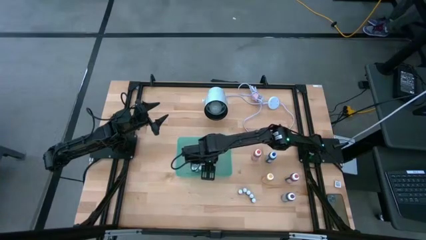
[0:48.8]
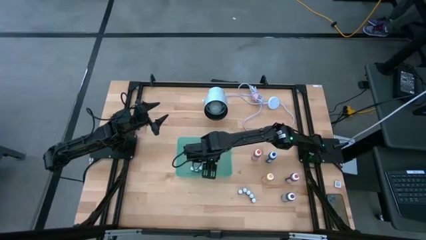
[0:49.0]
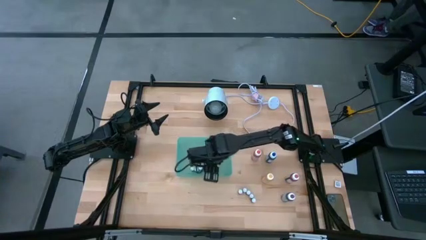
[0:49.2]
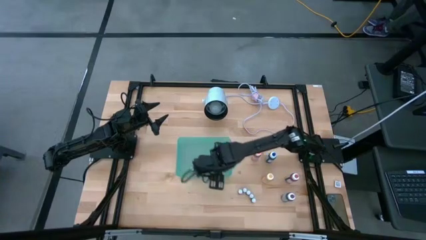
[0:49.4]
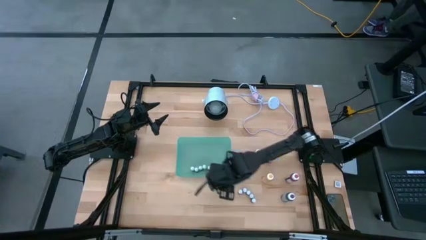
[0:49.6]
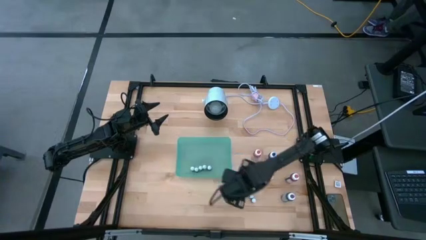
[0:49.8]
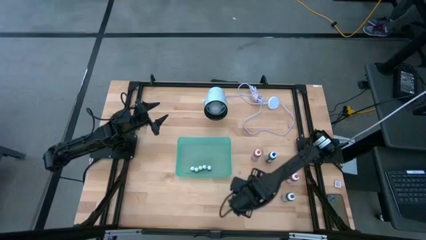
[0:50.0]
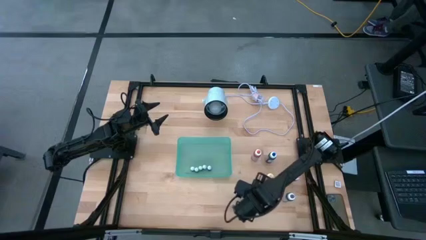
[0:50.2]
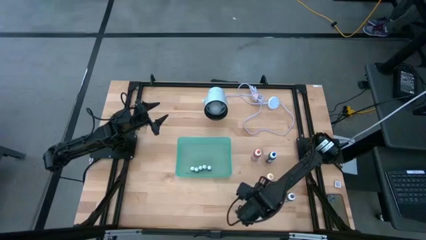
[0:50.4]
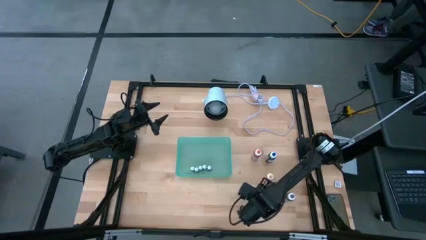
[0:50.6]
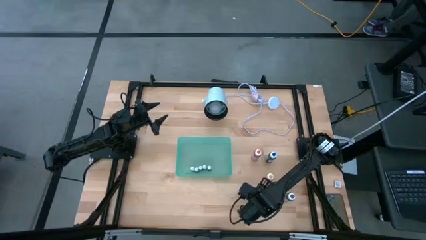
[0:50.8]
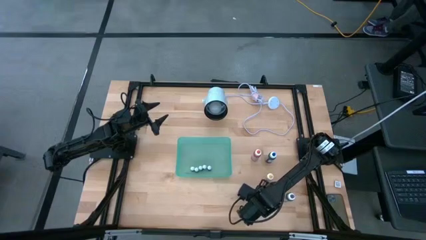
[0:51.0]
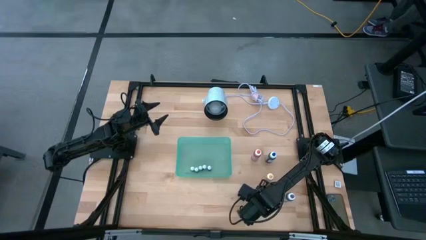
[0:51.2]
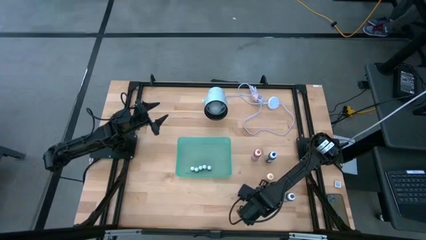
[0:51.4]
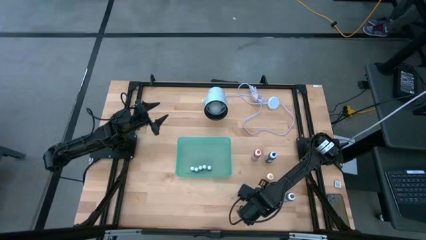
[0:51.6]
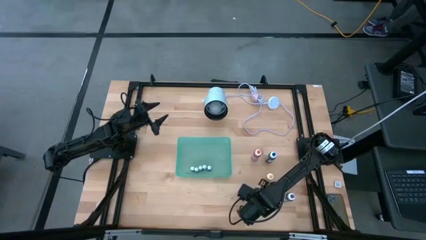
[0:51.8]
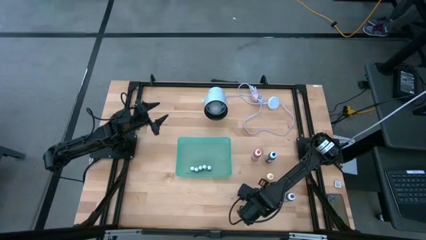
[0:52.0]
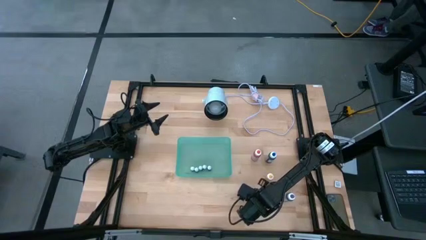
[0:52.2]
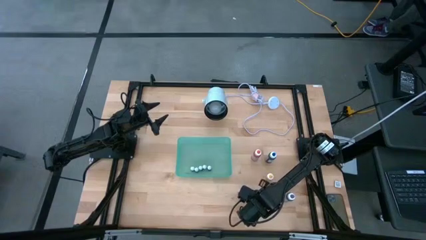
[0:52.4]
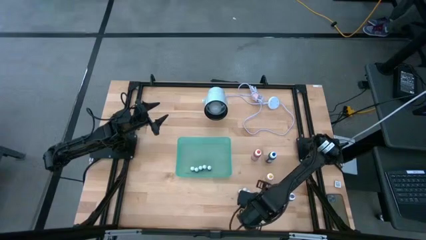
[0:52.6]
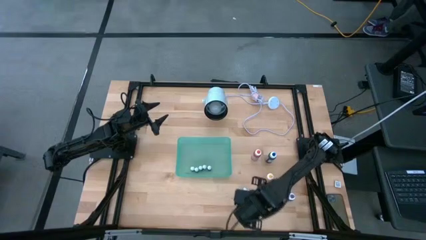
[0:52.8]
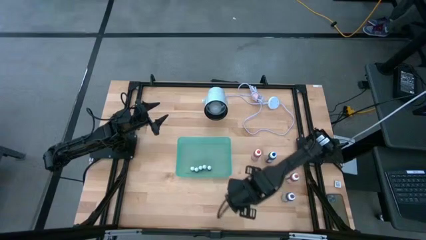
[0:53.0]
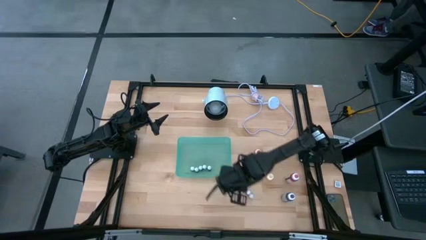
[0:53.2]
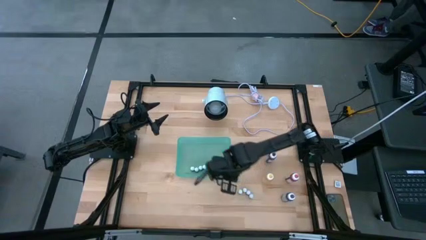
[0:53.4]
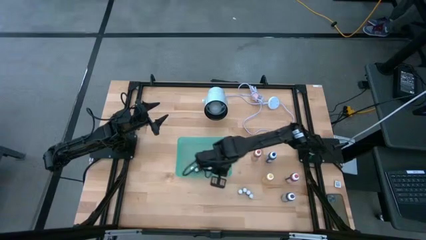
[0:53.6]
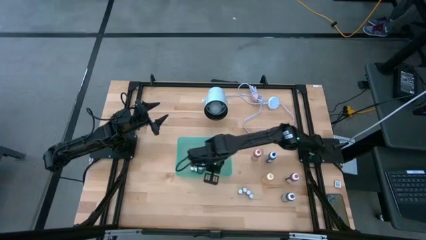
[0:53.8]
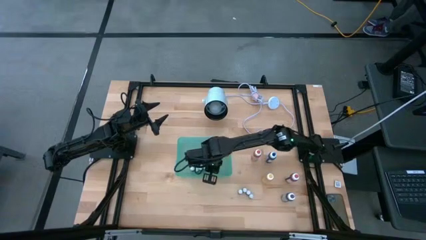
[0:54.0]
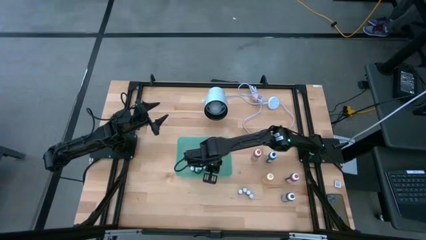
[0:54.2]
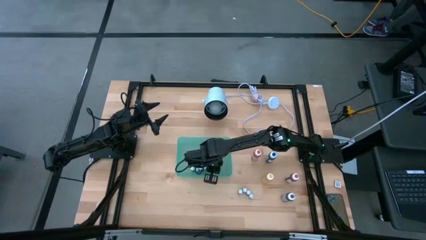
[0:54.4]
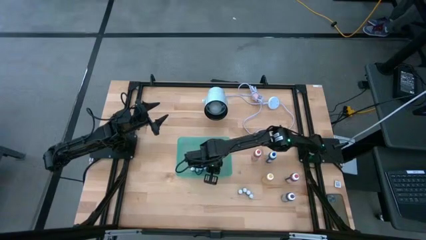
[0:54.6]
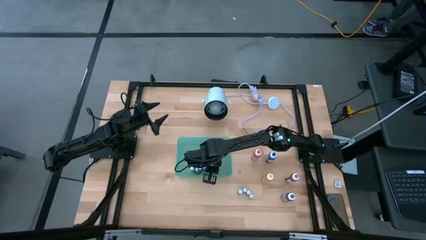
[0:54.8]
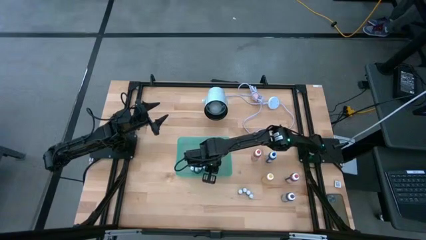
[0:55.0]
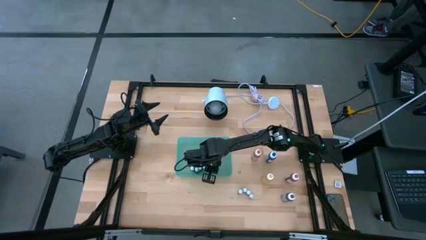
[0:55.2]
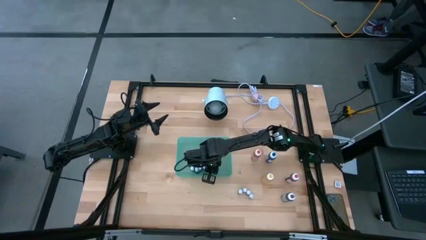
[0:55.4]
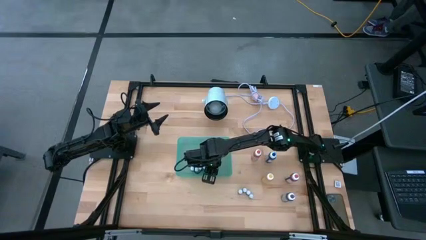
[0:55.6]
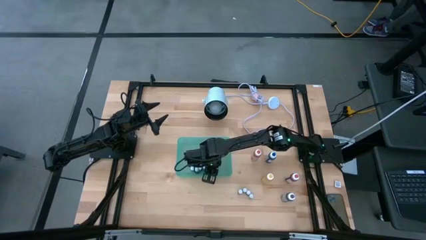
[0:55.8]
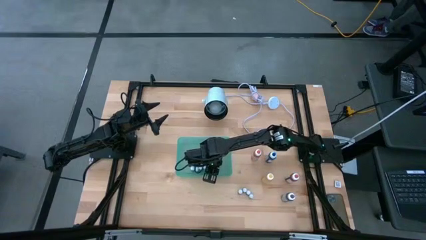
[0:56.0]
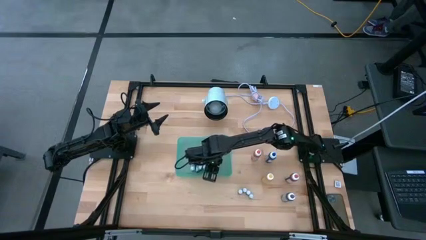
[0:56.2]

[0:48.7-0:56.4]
Task: Pick & Place food coloring
Put the small orange food coloring bottle into the bin

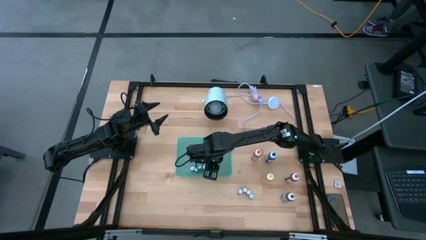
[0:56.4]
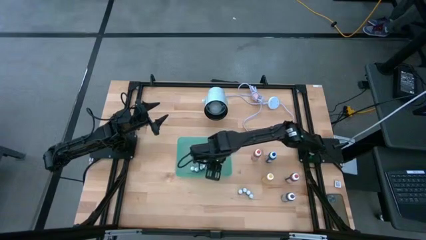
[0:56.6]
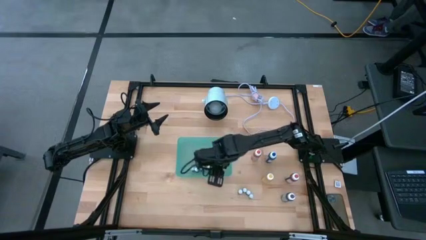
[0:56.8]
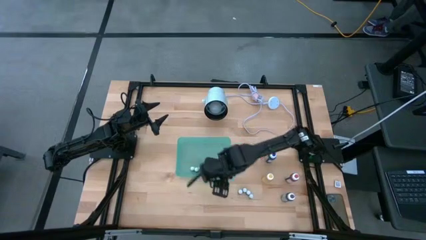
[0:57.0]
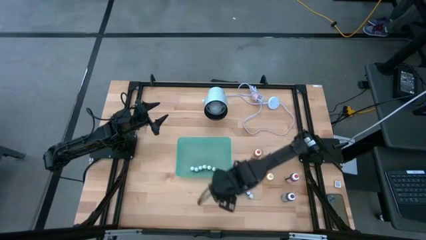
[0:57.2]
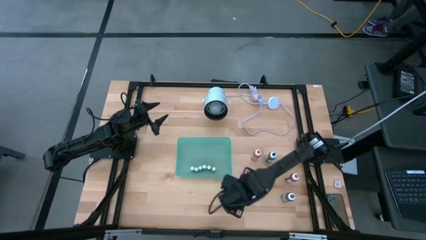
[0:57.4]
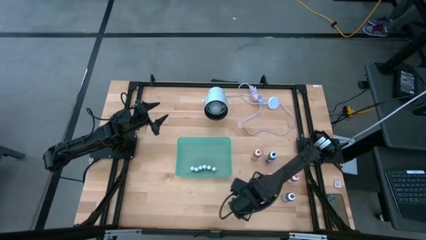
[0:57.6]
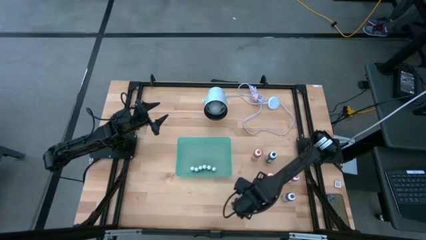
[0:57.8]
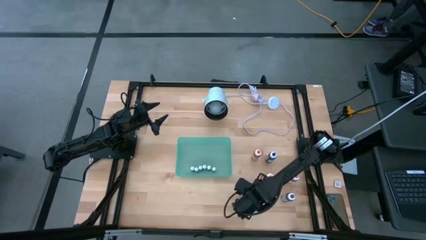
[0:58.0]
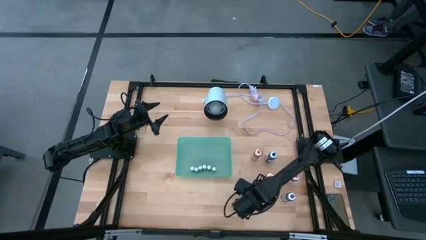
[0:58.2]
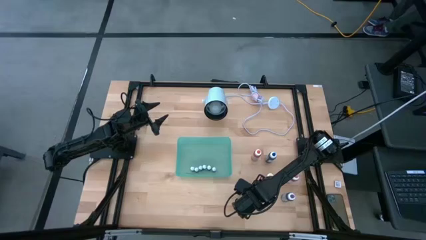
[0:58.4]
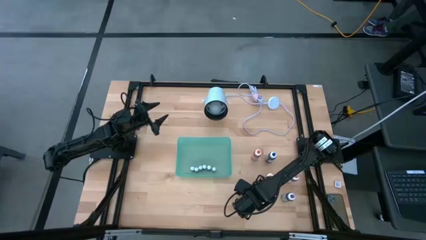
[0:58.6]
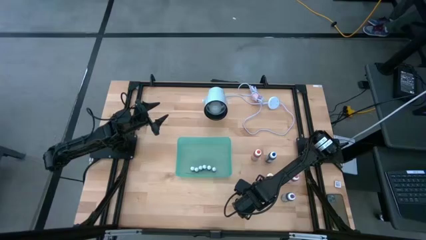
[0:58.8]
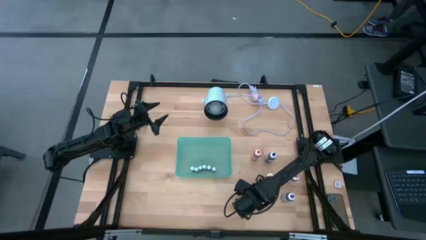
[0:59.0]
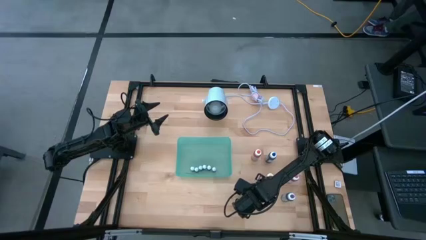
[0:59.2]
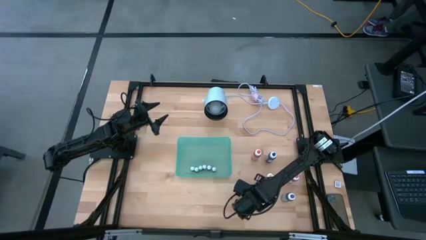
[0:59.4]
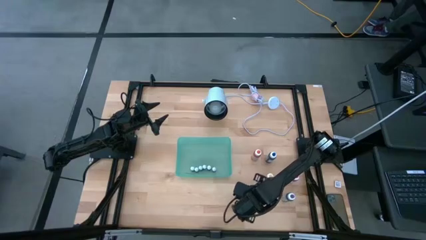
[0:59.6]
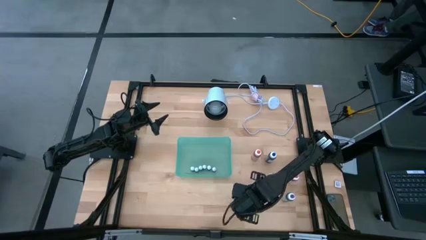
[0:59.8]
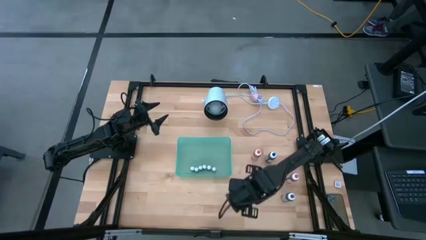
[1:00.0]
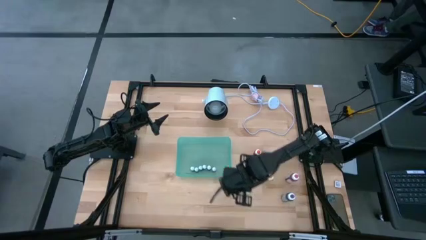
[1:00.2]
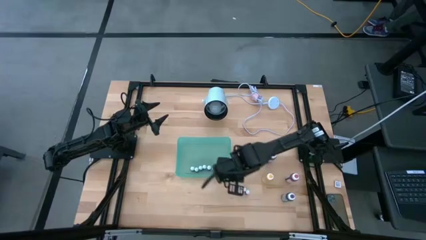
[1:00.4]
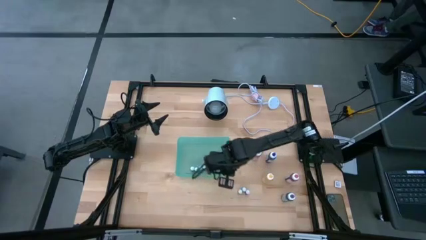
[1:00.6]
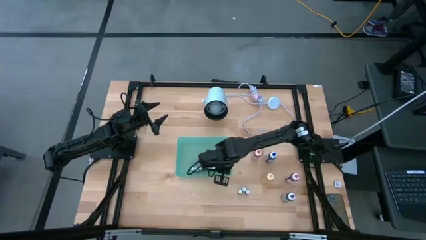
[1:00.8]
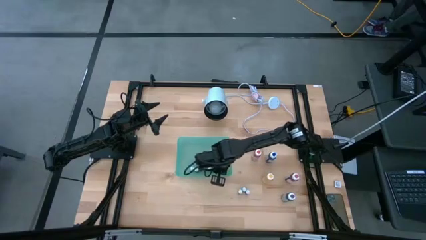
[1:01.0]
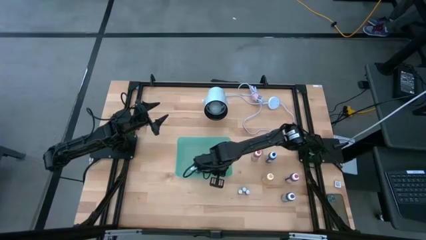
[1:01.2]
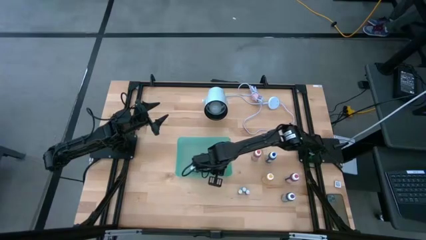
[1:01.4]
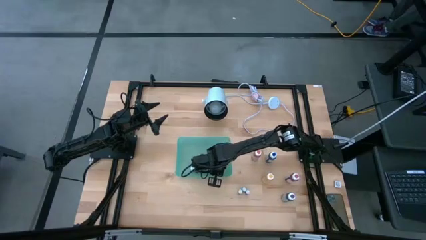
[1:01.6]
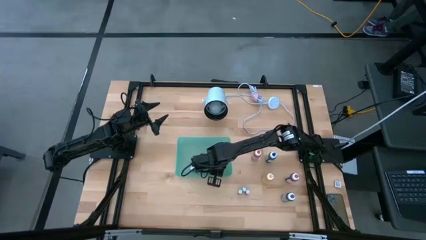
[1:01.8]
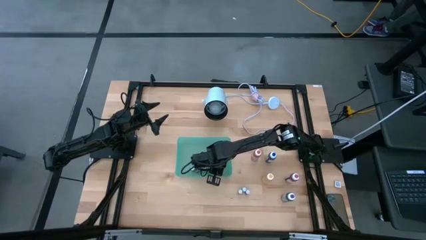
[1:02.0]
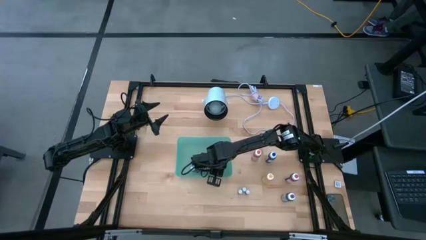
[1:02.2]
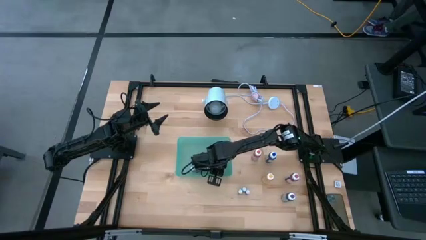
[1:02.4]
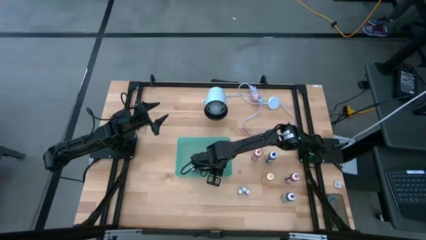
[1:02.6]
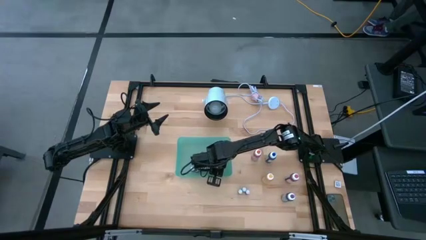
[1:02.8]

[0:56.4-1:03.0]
Put the small red food coloring bottle into the bin
